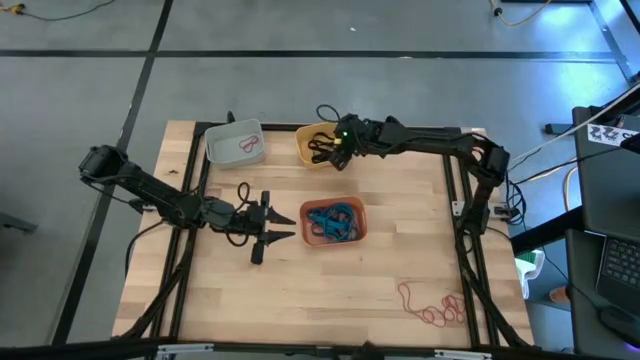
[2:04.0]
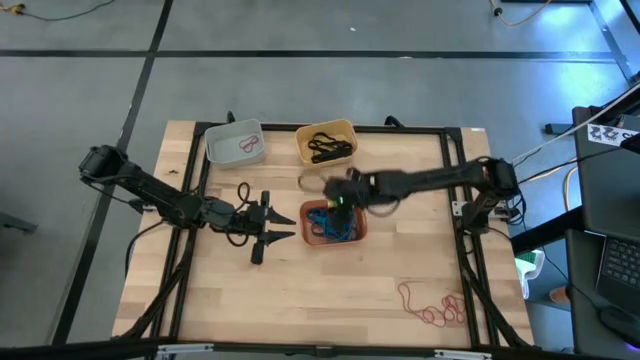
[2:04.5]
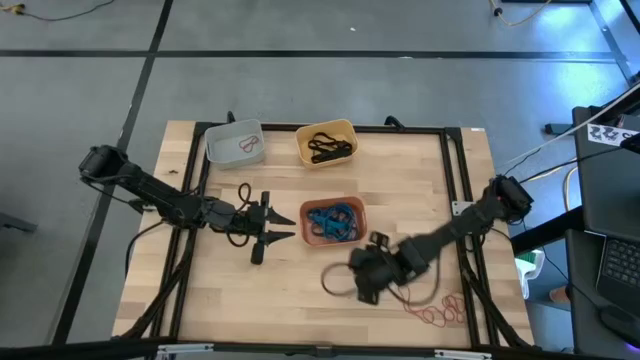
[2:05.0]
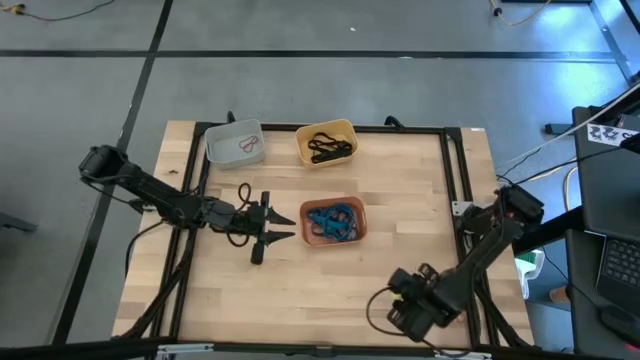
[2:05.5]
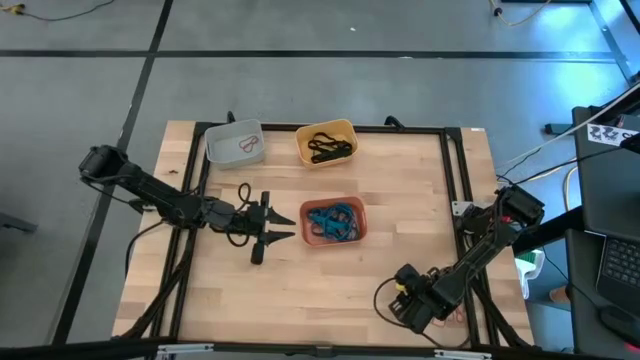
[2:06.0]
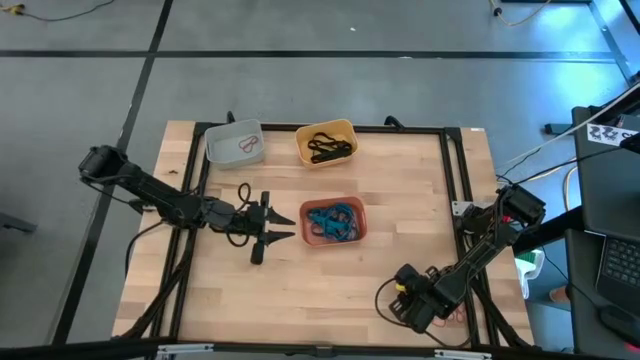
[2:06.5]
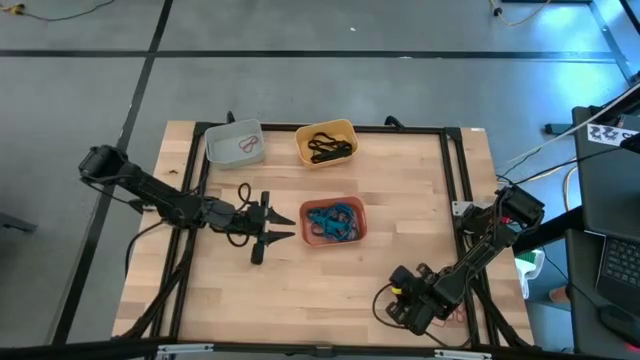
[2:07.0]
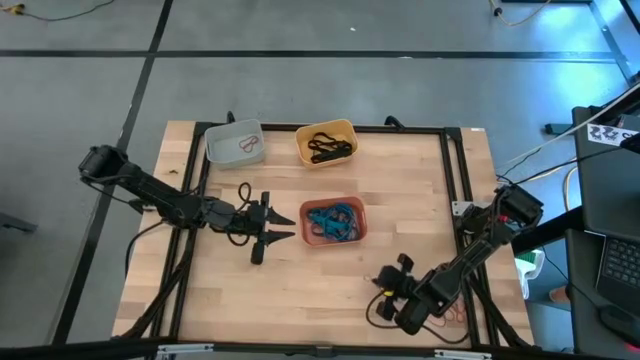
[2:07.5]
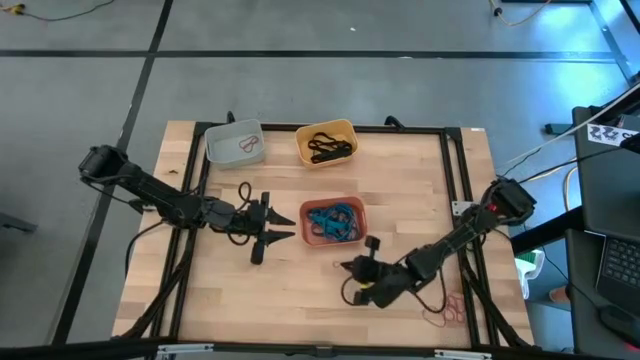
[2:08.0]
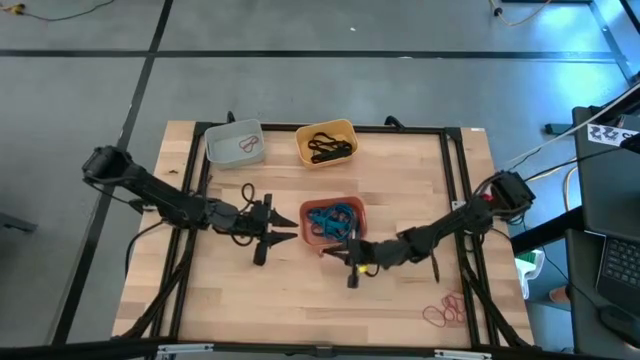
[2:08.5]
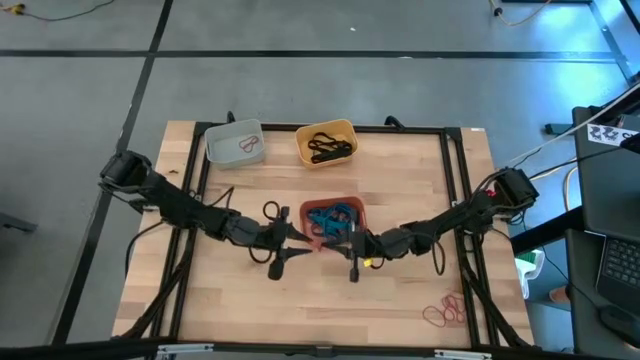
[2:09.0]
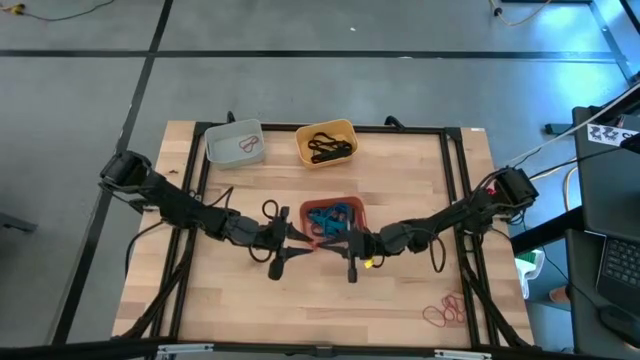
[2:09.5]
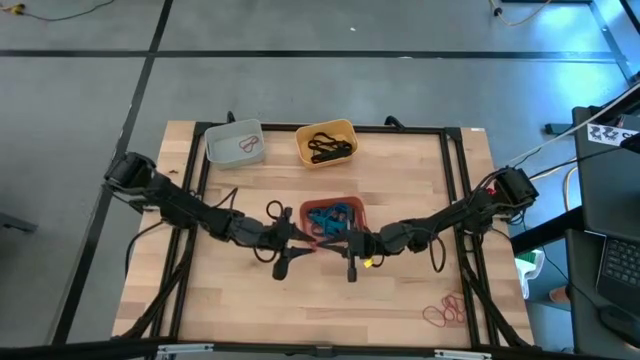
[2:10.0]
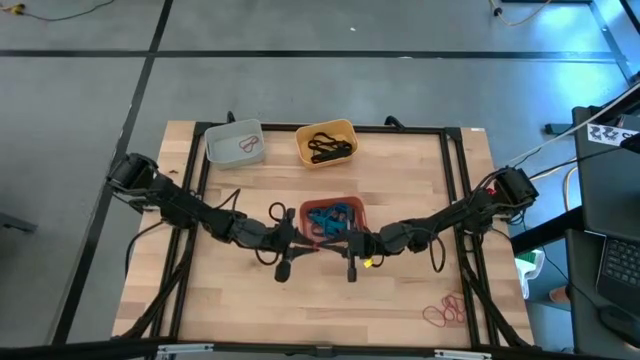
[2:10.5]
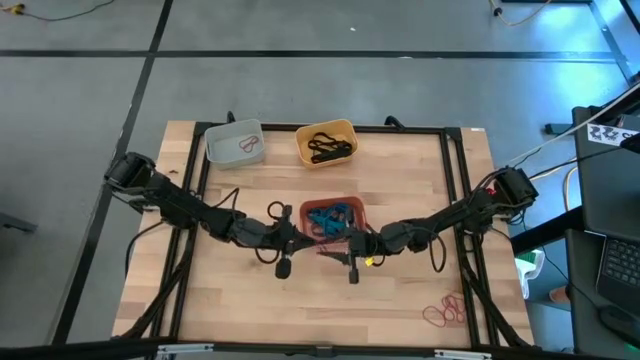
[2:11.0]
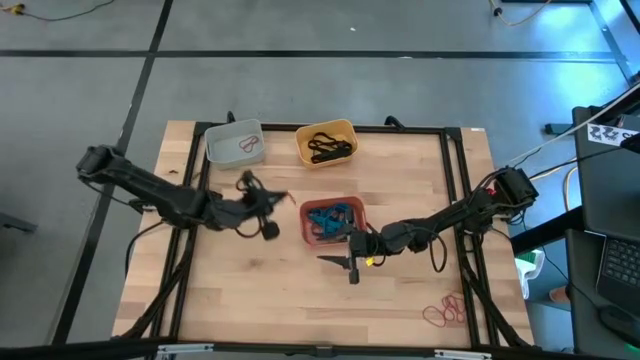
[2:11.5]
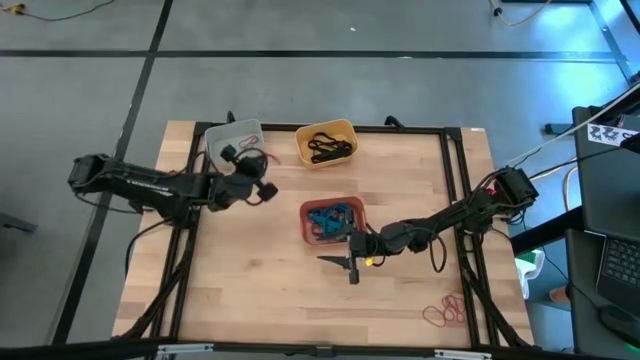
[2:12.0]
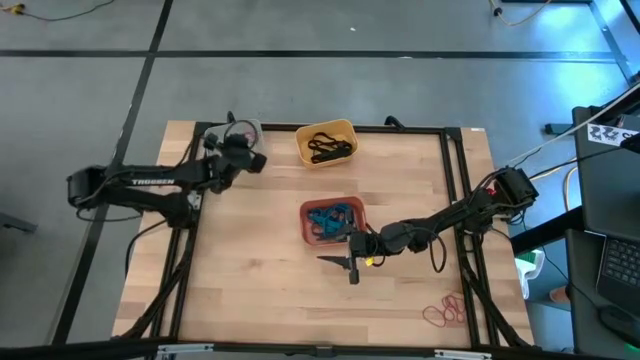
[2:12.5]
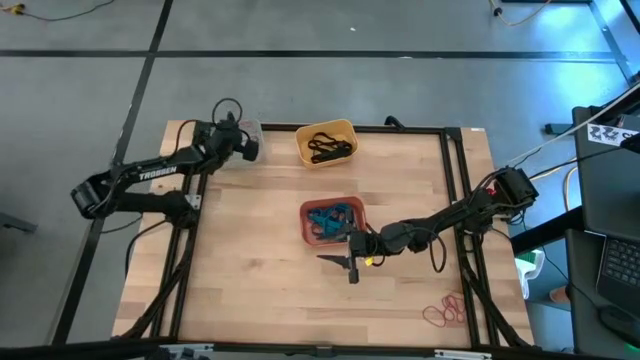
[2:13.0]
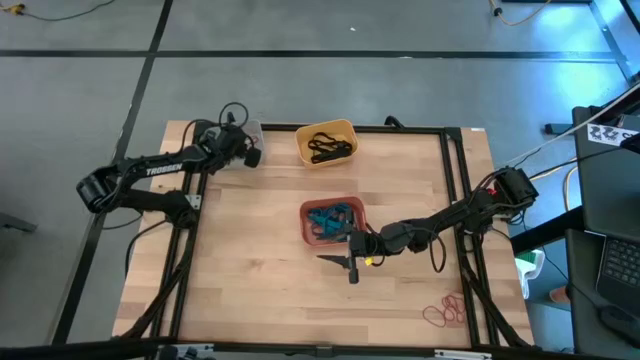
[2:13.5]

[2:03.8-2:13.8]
Task: Sort rubber bands into baskets
Put the red rubber band into the gray bin

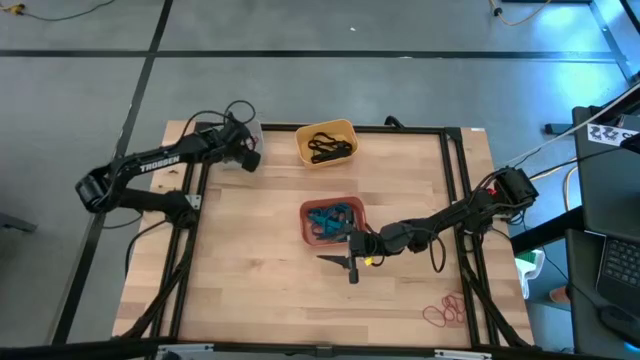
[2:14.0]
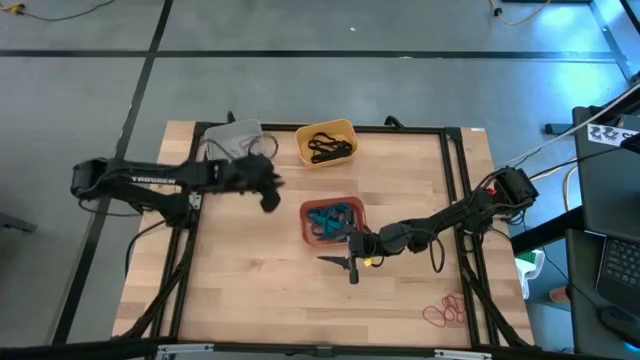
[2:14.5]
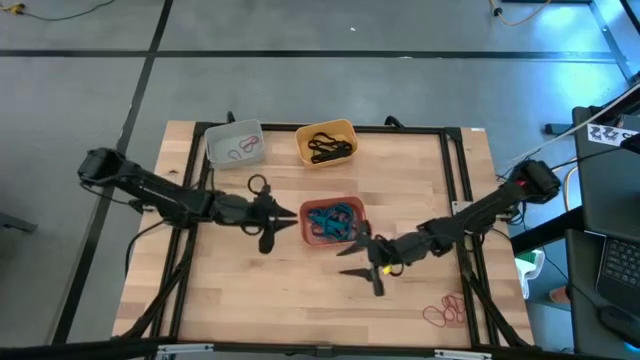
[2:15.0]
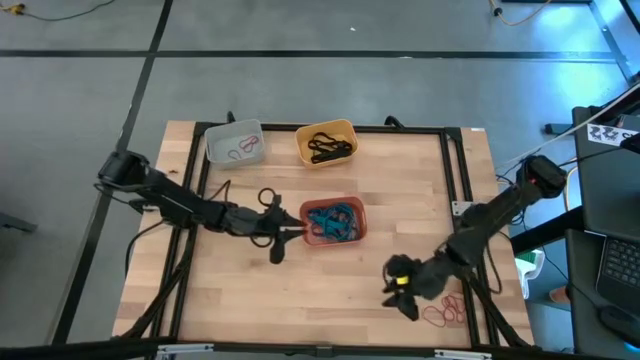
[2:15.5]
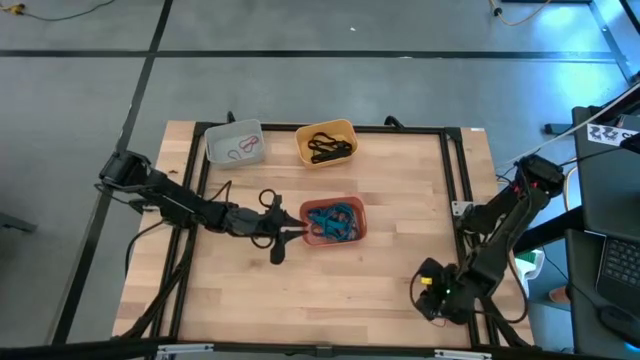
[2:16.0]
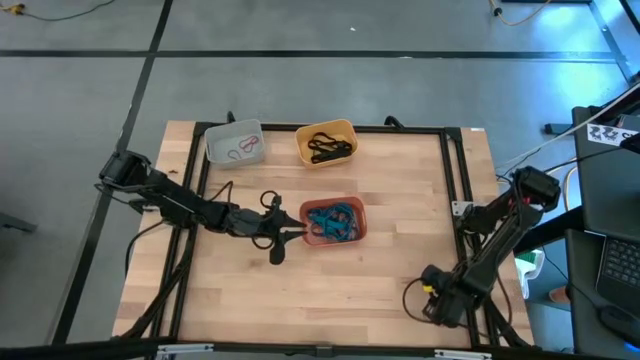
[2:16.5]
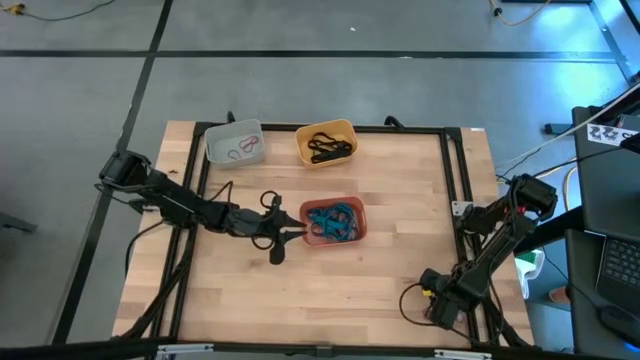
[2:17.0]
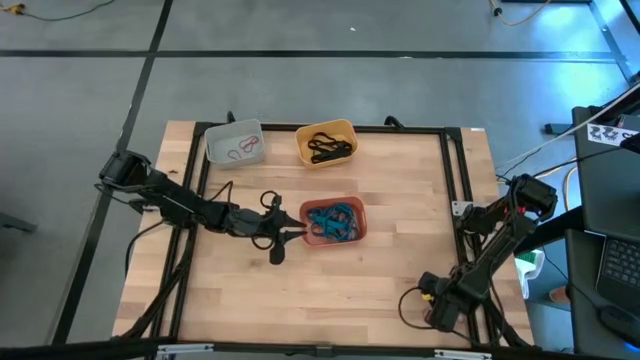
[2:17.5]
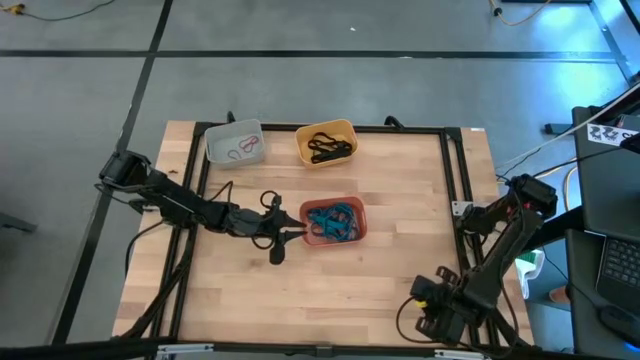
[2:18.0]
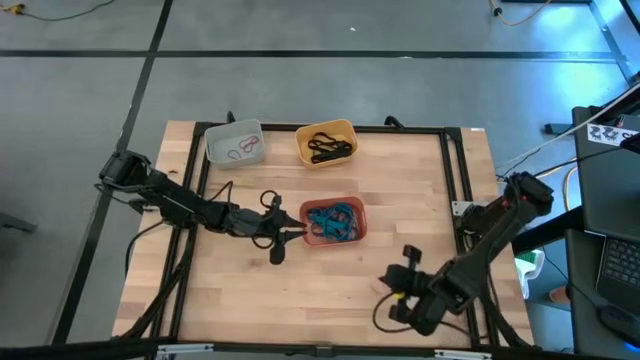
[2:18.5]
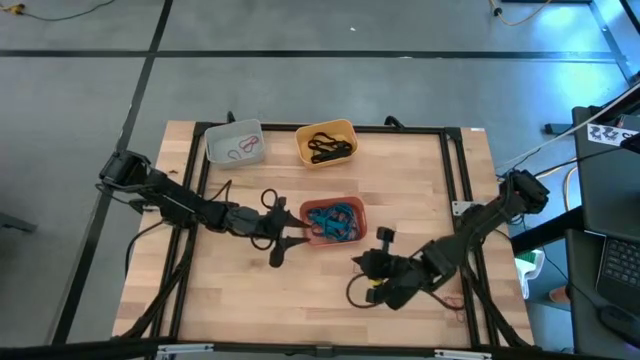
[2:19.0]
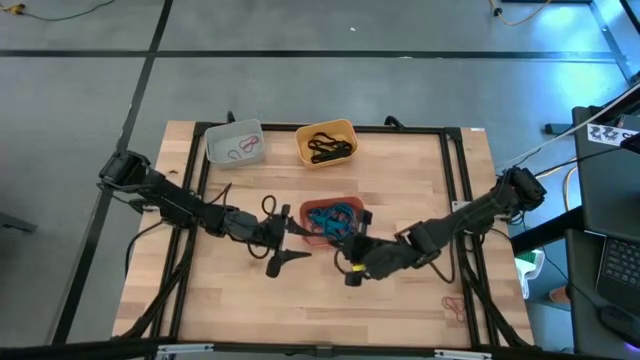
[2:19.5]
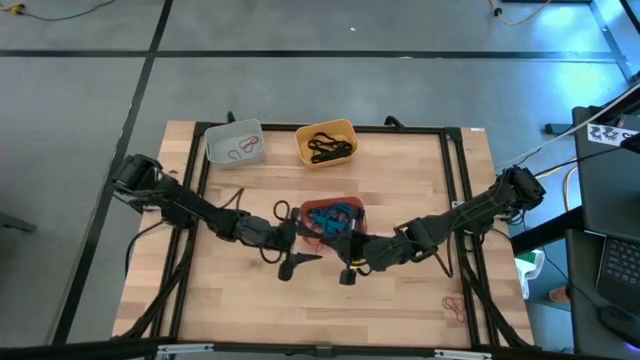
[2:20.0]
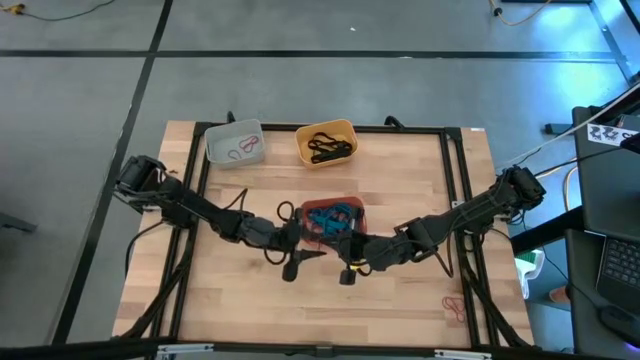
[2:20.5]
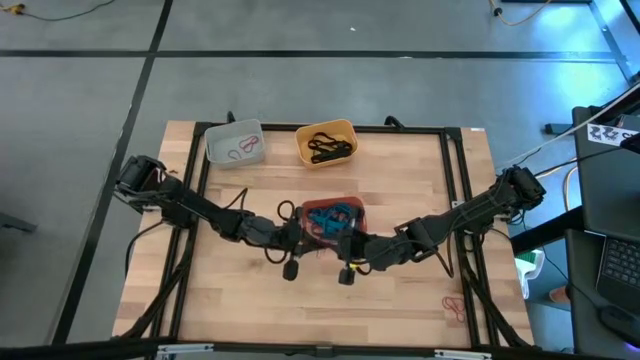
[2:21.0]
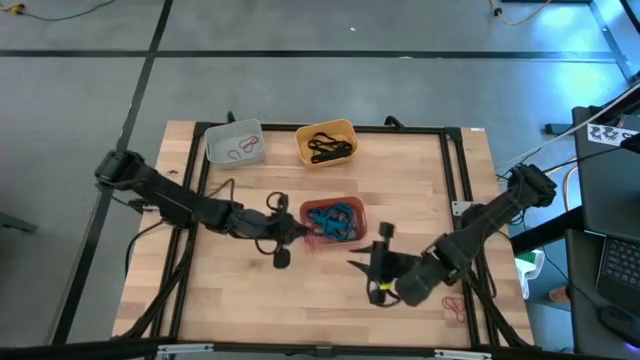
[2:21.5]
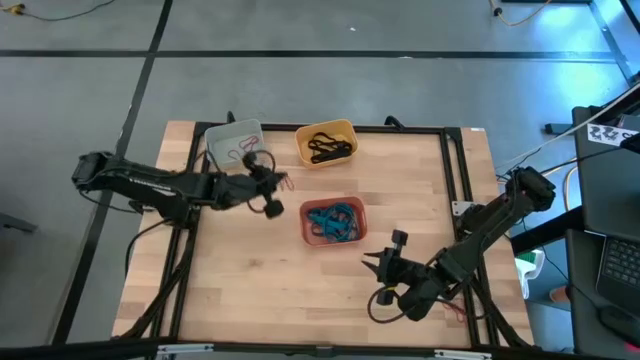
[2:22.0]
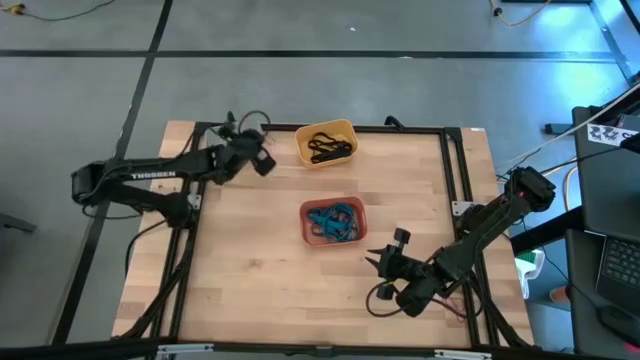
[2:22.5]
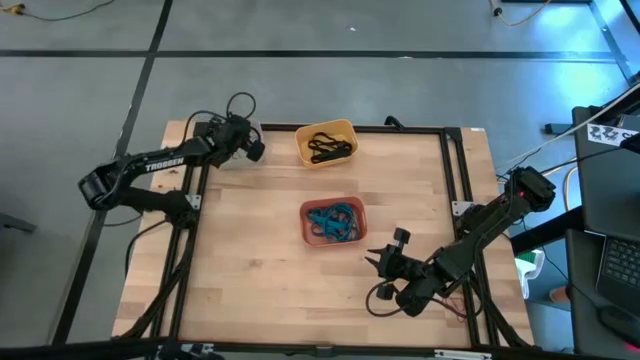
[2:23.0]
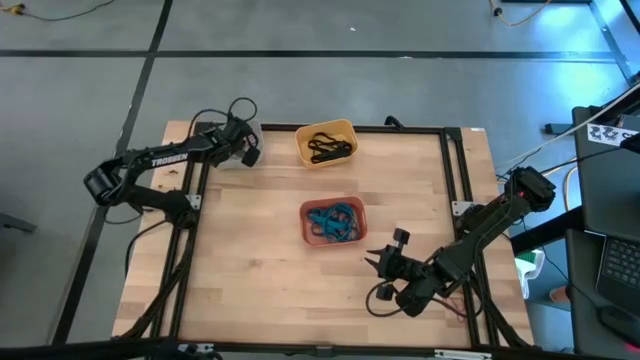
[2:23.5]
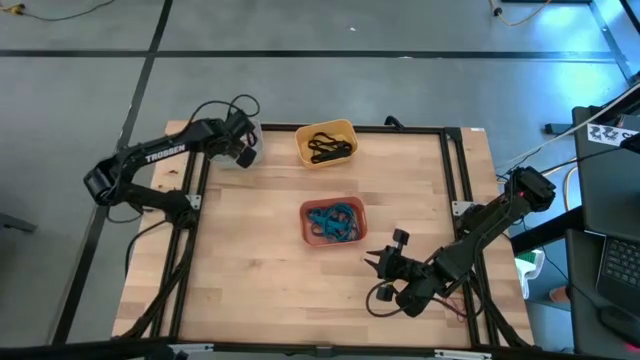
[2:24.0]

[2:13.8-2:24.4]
Put the red rubber band into the gray bin
